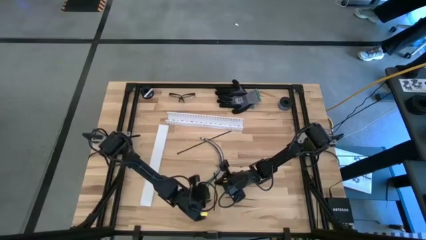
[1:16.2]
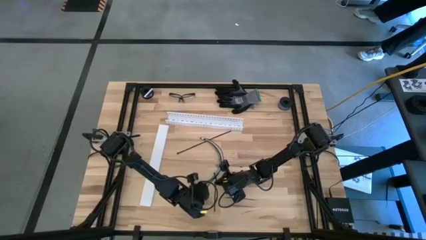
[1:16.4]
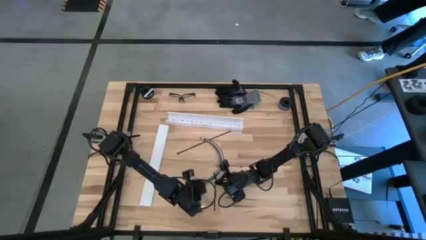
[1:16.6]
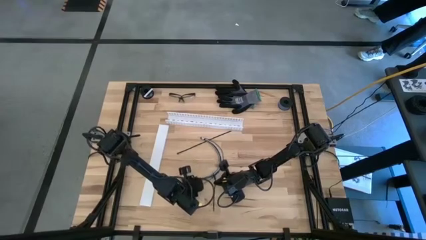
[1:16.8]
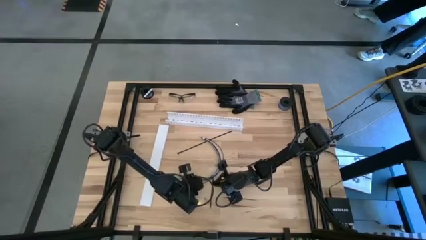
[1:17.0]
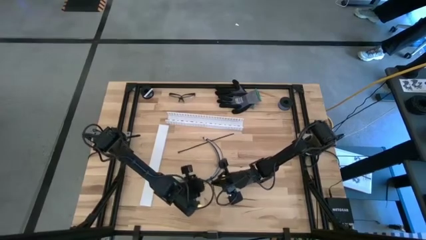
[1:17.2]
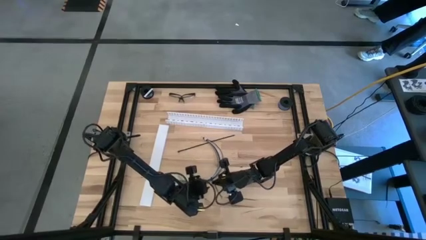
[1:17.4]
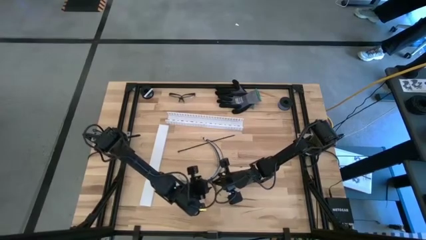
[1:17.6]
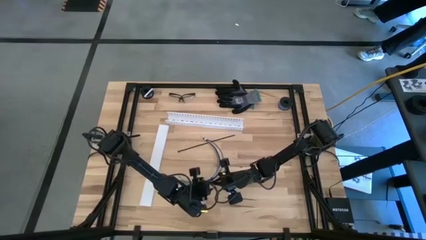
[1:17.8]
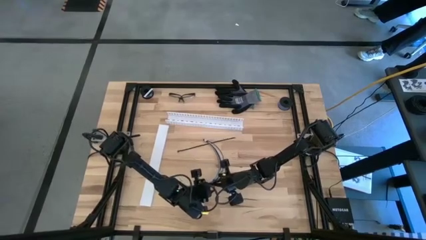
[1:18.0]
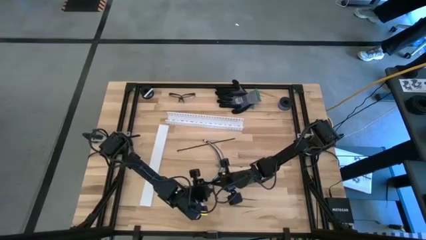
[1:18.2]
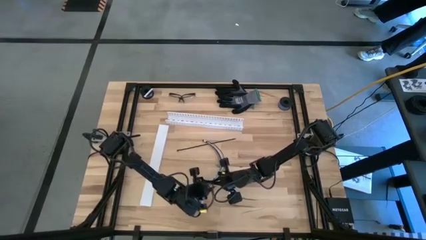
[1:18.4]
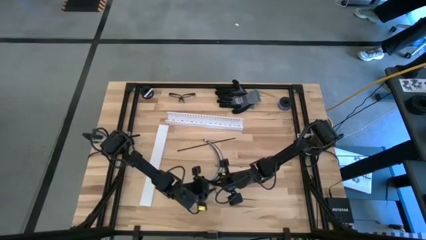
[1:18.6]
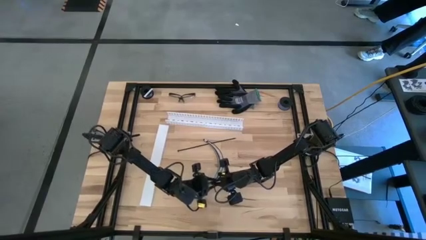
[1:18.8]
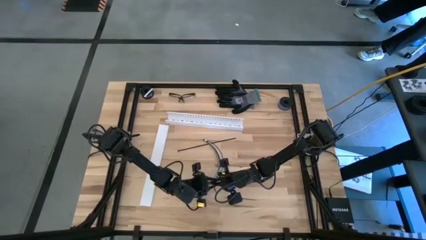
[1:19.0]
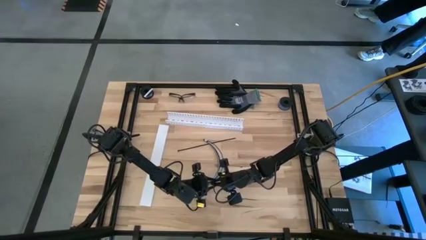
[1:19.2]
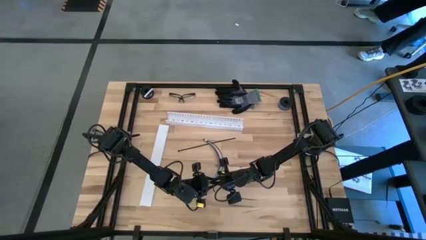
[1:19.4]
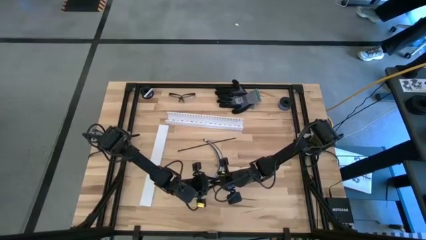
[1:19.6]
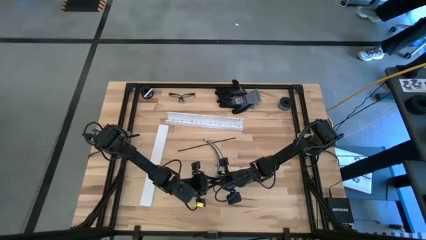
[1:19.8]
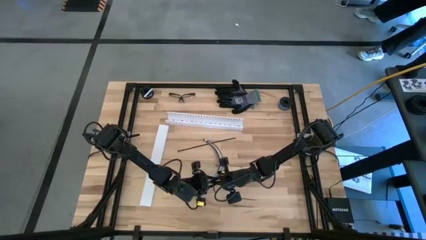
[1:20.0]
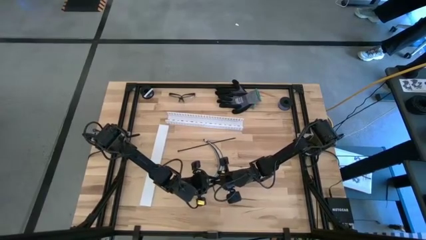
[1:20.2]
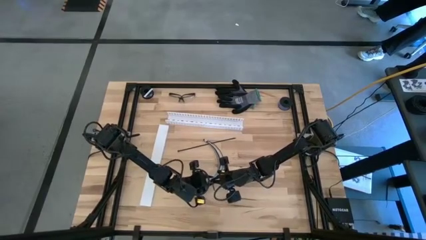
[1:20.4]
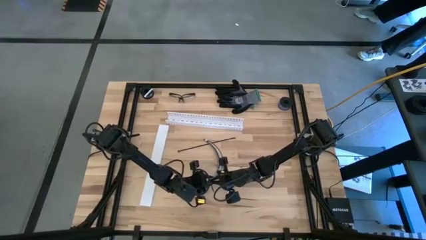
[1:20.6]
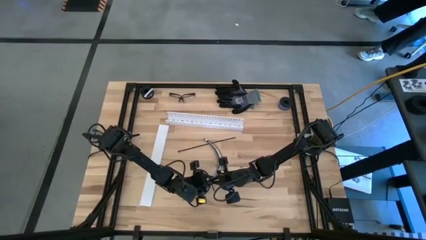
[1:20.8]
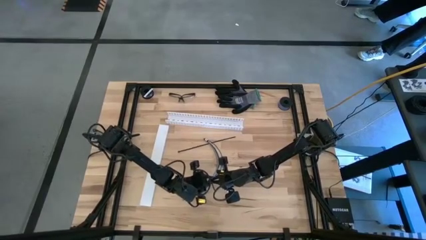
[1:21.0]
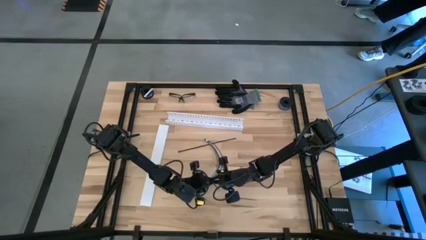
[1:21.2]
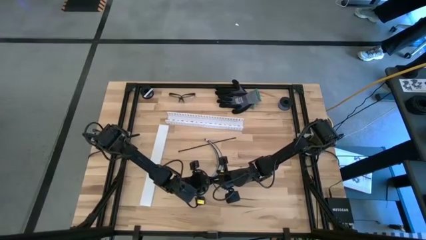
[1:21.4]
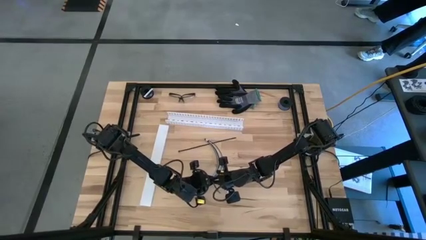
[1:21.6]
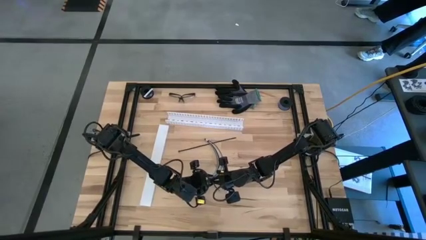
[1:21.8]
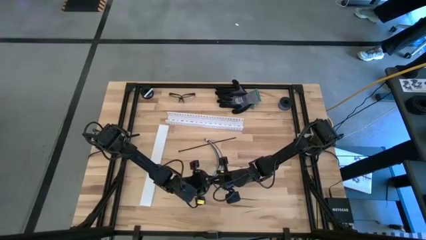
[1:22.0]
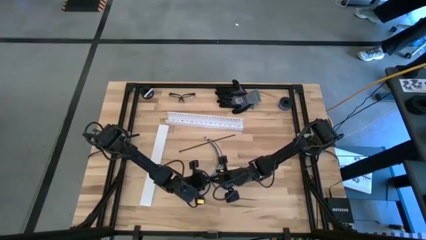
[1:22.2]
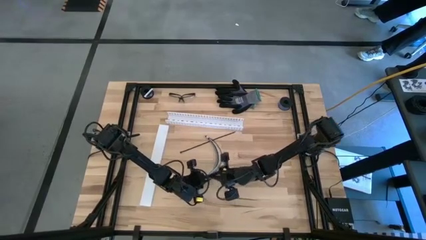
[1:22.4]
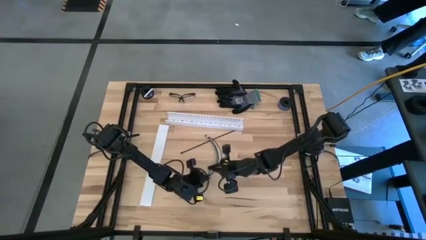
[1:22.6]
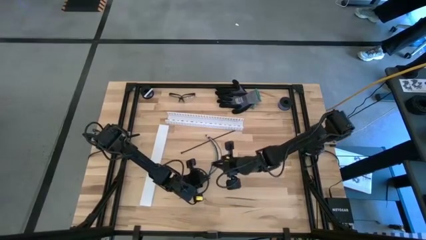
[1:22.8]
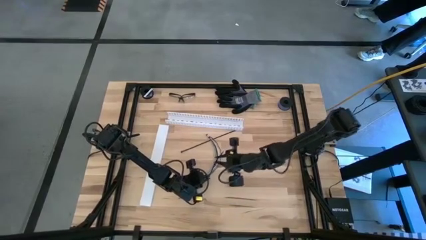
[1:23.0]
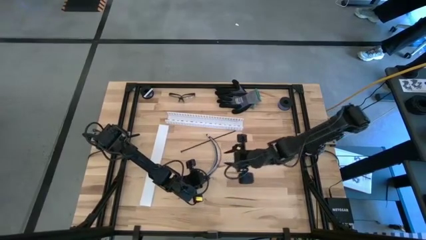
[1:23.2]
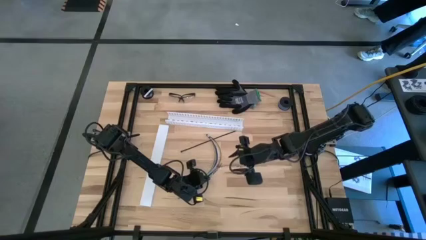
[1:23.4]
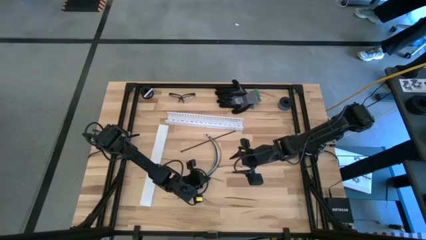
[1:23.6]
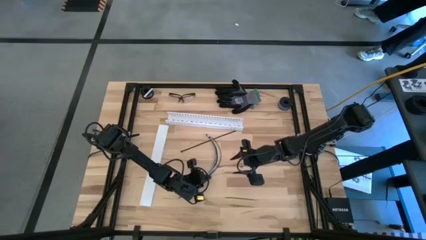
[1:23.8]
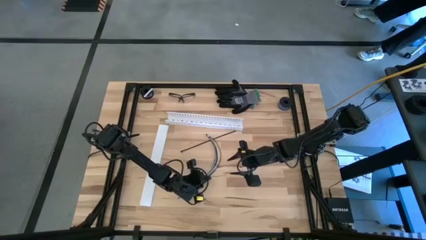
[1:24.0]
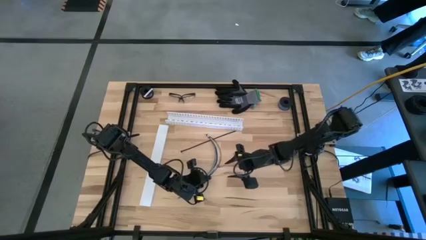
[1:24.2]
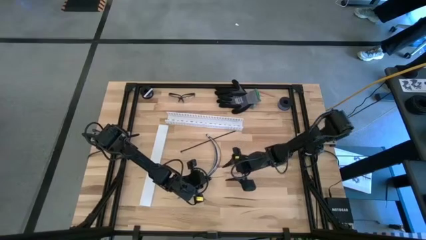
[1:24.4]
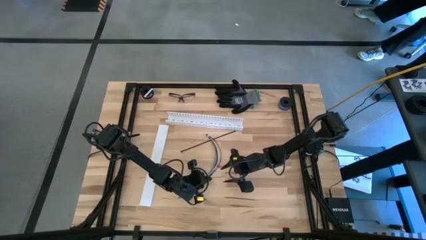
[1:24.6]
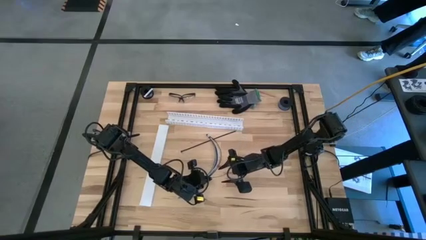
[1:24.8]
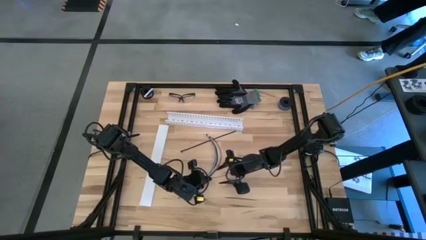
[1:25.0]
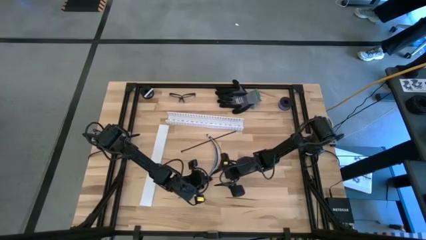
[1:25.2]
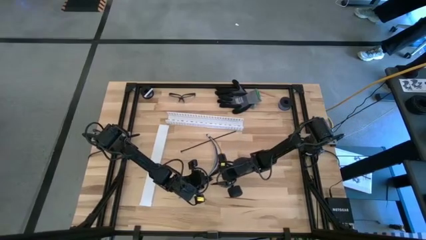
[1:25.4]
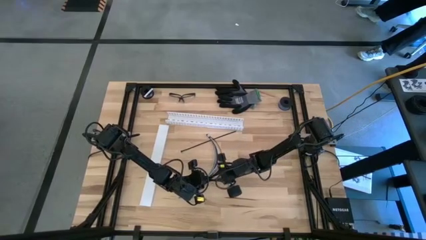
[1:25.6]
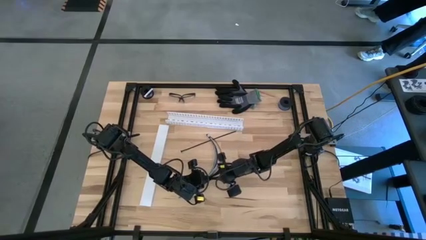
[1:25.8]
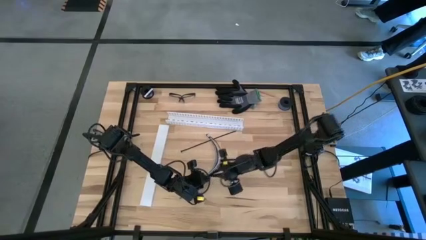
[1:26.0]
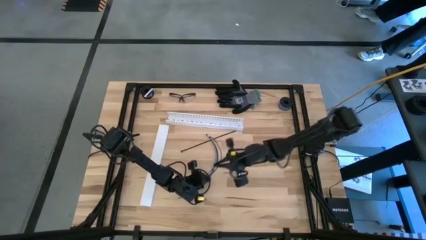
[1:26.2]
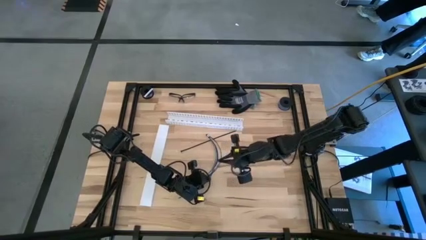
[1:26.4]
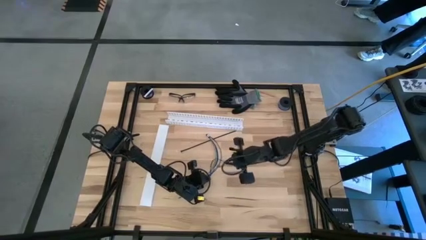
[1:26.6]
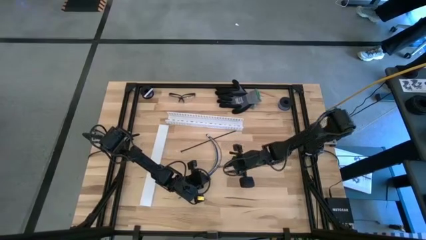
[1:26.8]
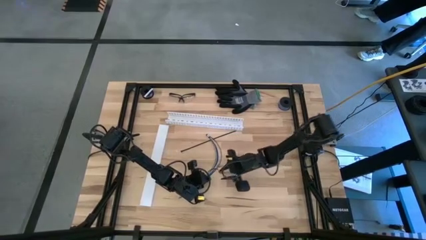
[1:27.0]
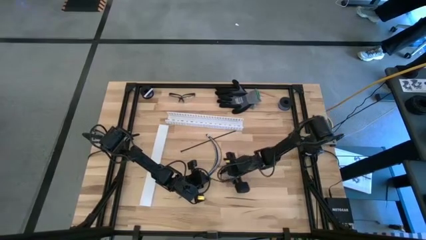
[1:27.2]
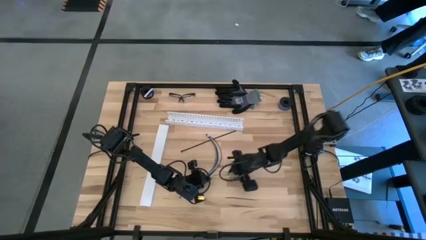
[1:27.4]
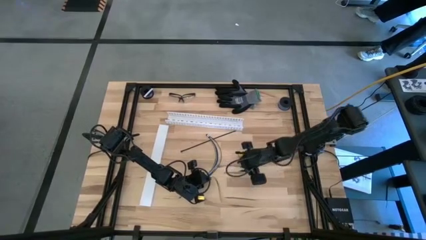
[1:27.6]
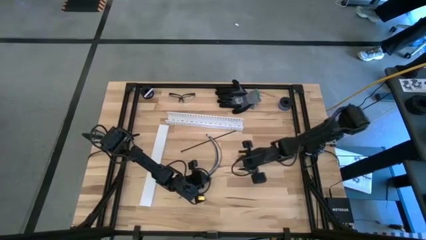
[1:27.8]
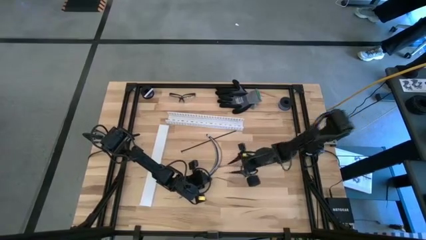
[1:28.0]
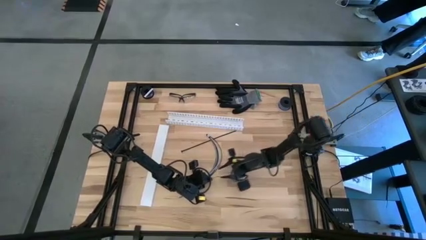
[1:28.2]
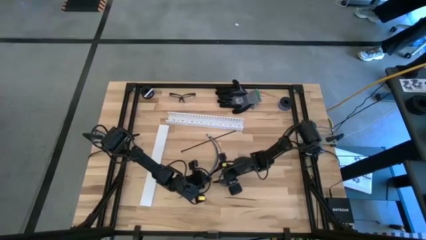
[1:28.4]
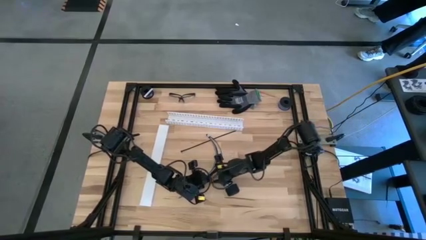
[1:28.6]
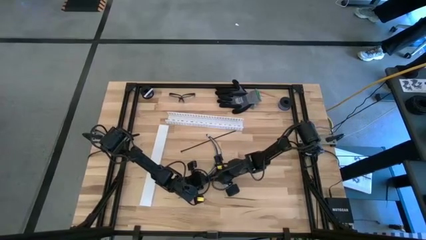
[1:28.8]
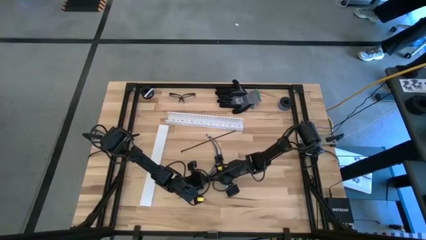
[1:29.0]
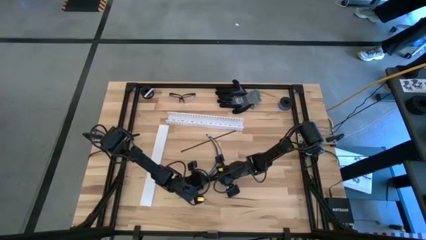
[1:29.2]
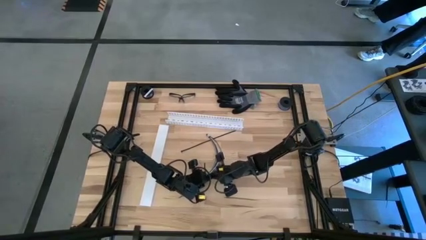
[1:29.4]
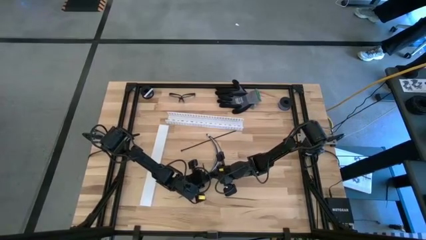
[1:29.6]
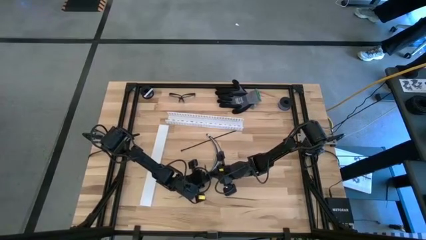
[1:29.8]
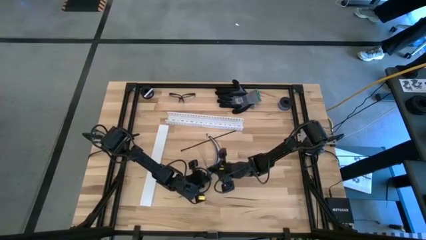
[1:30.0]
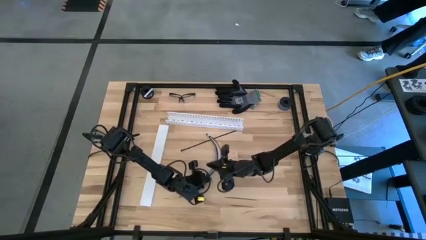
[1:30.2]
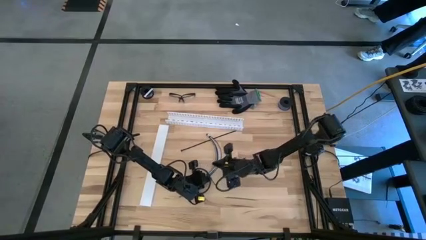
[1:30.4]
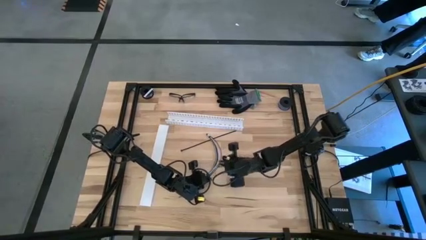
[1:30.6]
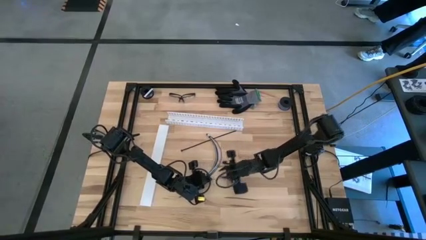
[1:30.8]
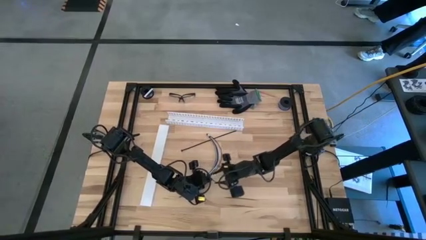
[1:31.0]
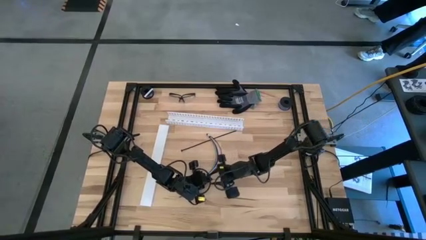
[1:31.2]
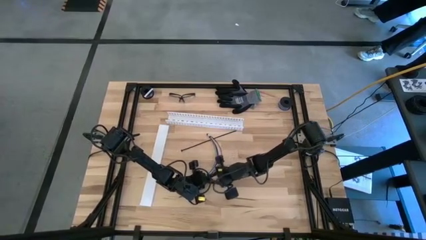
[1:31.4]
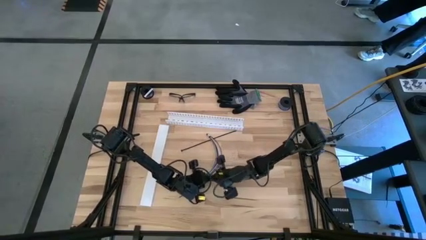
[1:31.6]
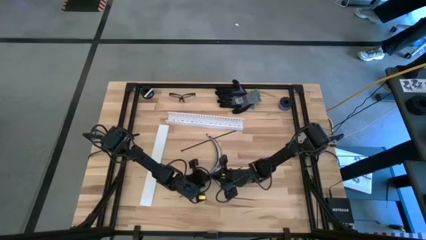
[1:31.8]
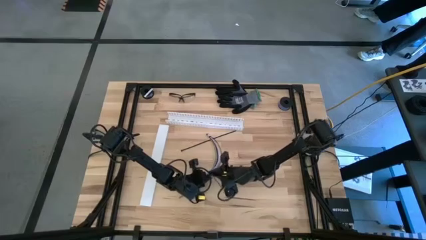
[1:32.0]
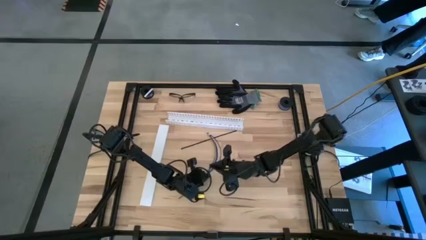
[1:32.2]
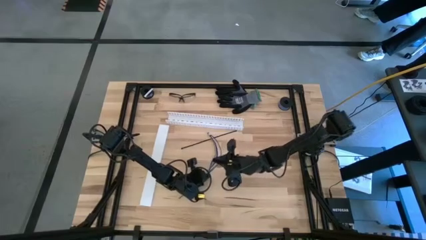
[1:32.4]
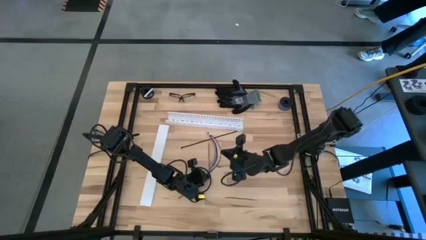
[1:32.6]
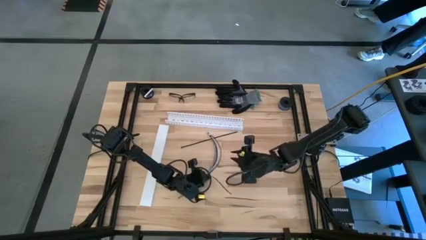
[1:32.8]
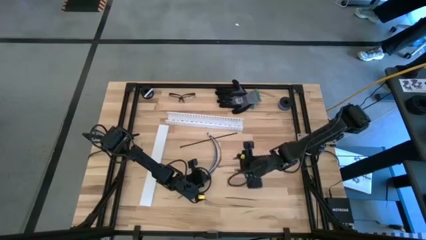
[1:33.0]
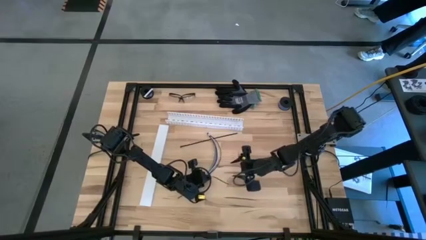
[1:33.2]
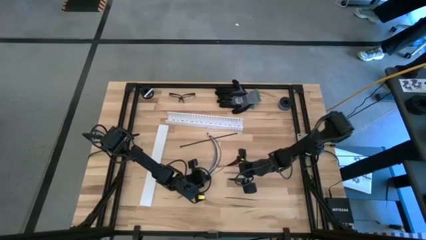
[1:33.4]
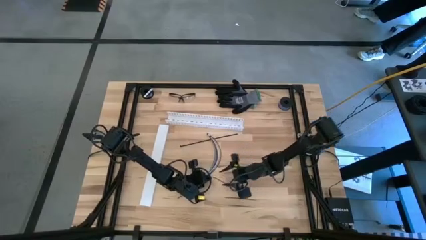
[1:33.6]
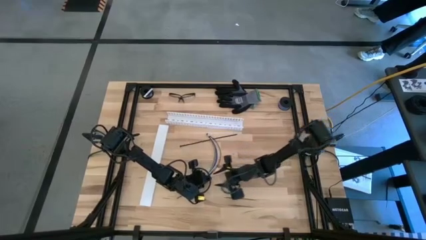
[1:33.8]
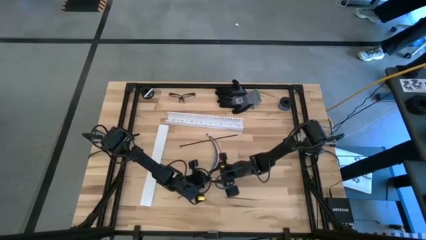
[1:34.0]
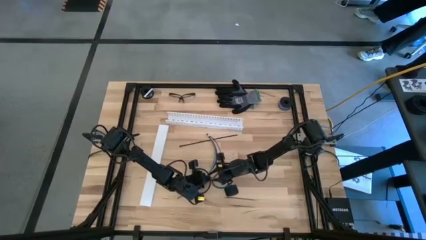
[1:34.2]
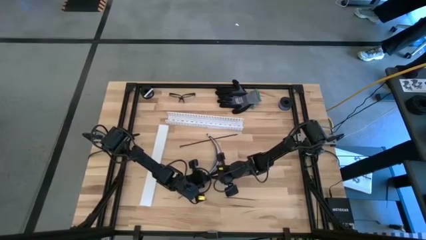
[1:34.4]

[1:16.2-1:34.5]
Task: Ziptie cables
Wrap the black zip tie on the cable
